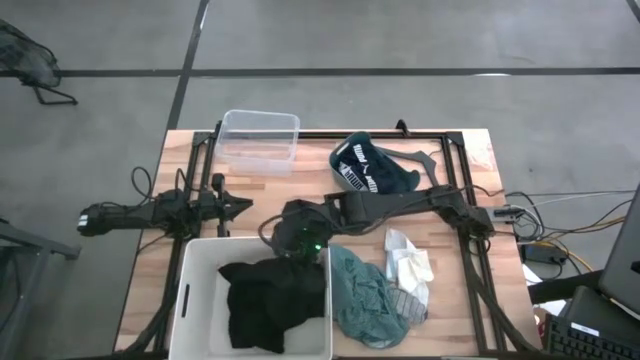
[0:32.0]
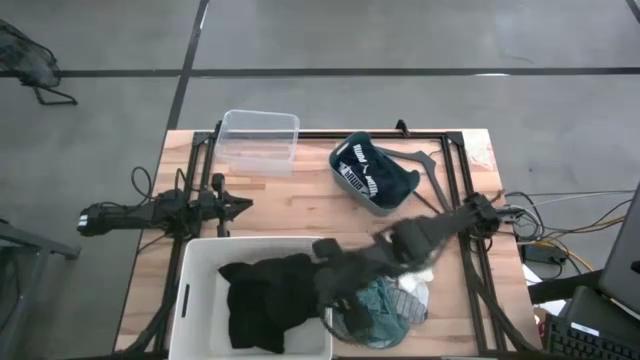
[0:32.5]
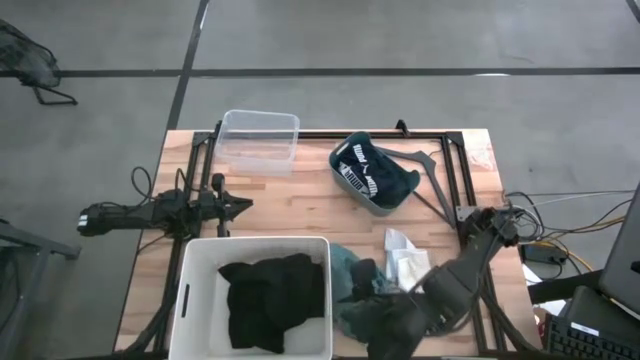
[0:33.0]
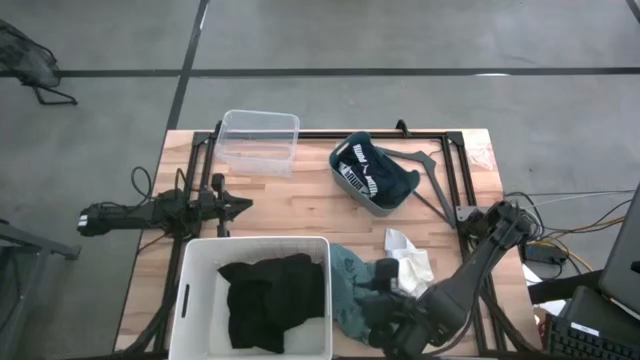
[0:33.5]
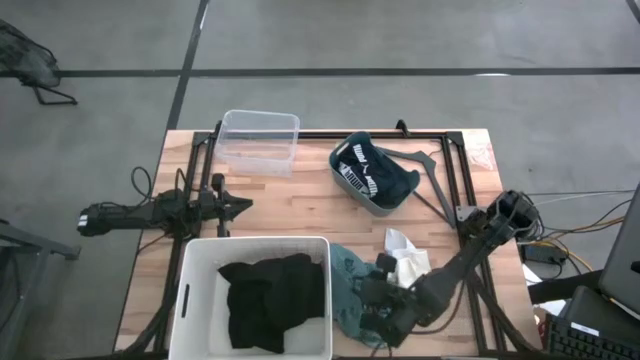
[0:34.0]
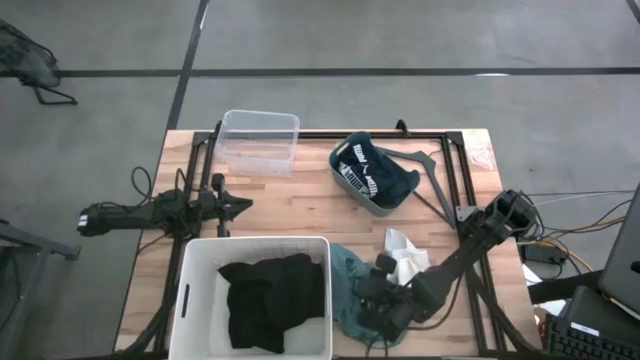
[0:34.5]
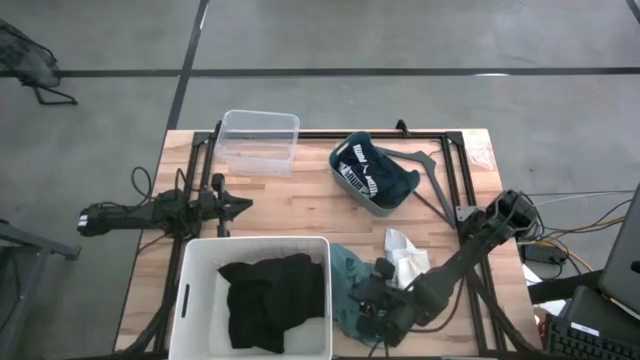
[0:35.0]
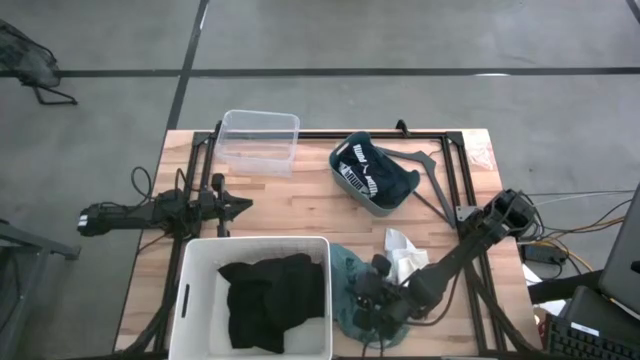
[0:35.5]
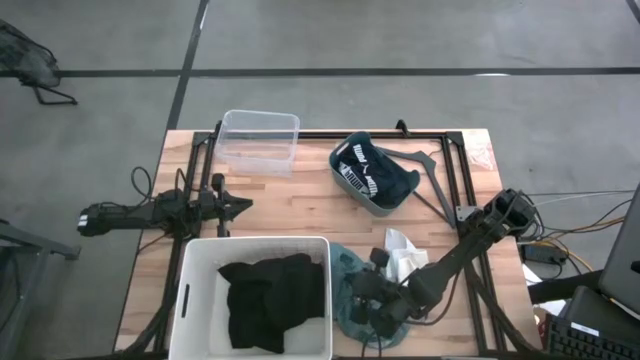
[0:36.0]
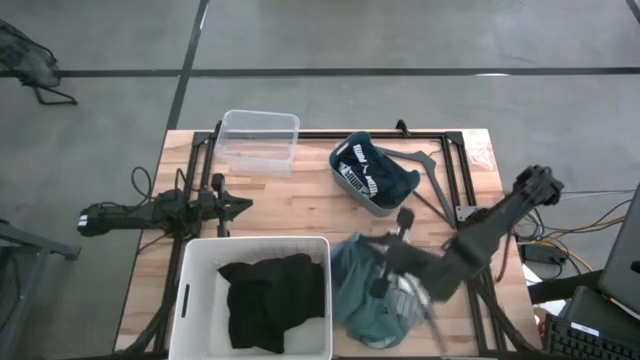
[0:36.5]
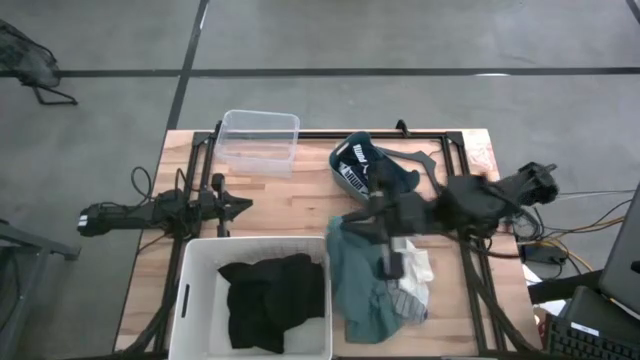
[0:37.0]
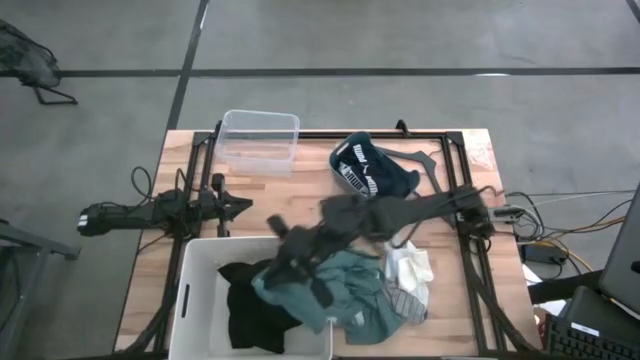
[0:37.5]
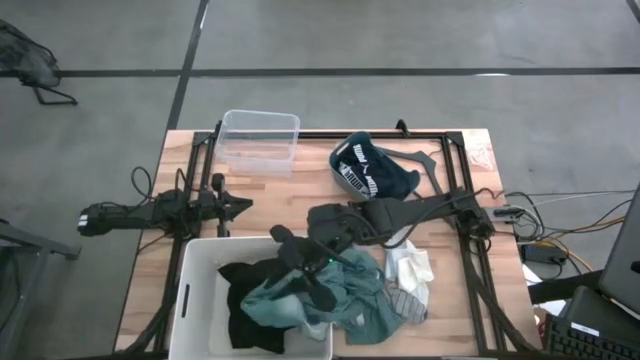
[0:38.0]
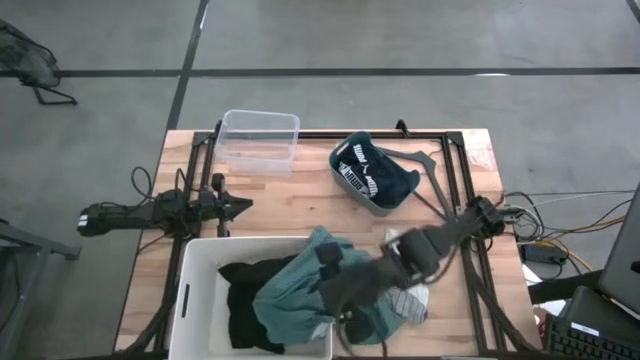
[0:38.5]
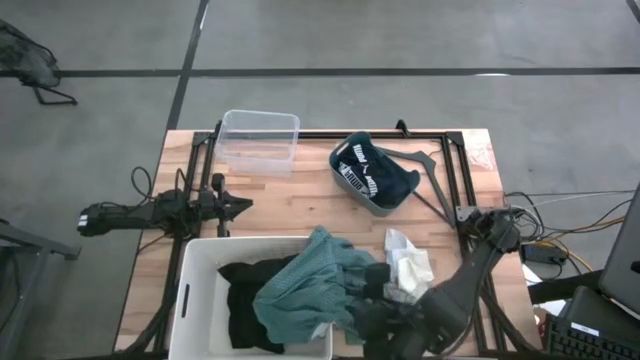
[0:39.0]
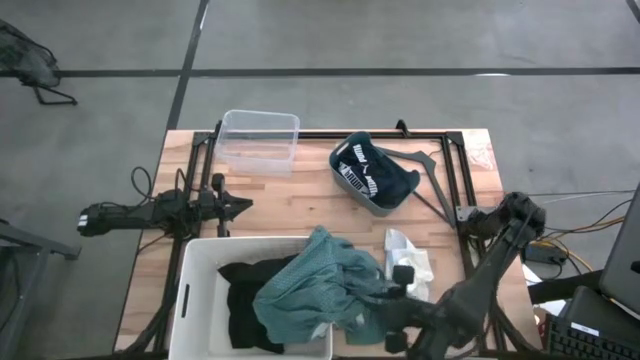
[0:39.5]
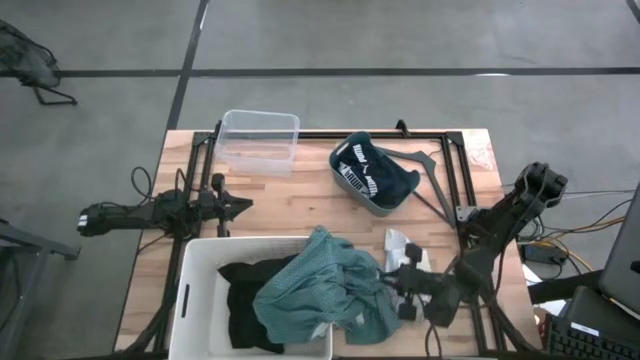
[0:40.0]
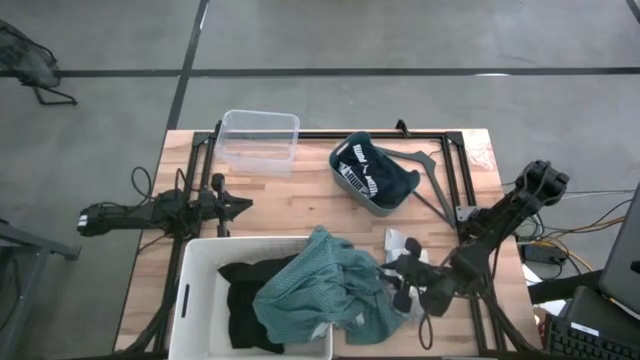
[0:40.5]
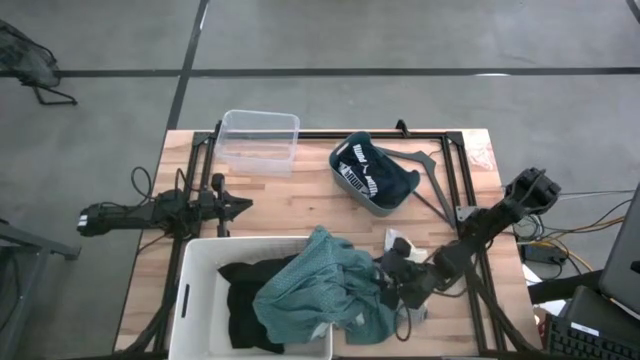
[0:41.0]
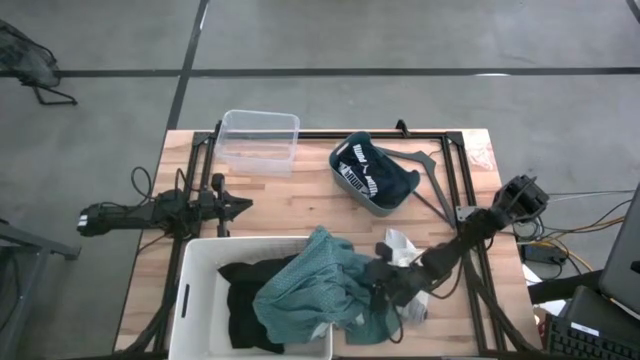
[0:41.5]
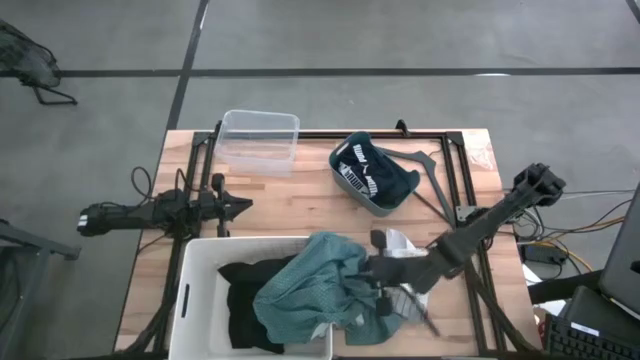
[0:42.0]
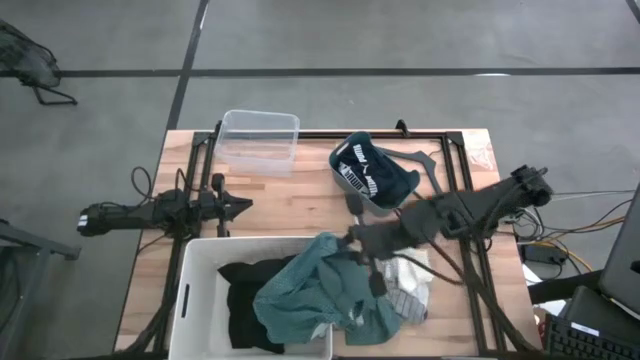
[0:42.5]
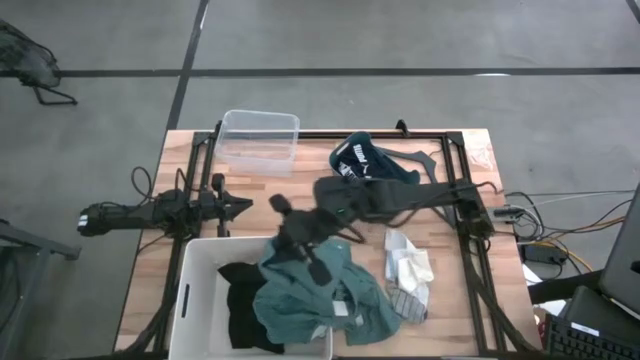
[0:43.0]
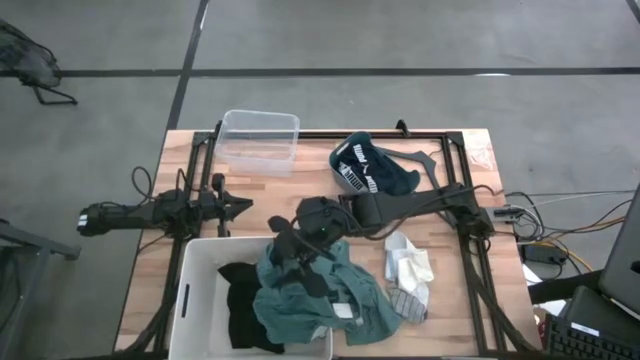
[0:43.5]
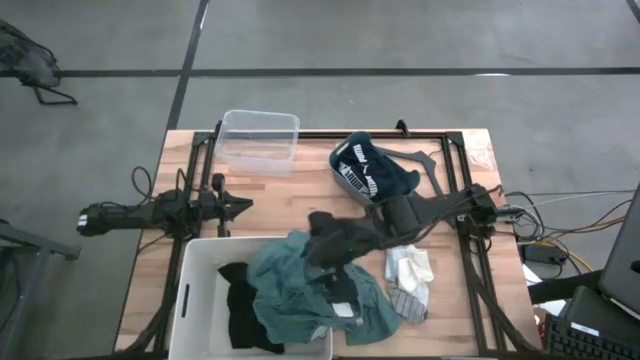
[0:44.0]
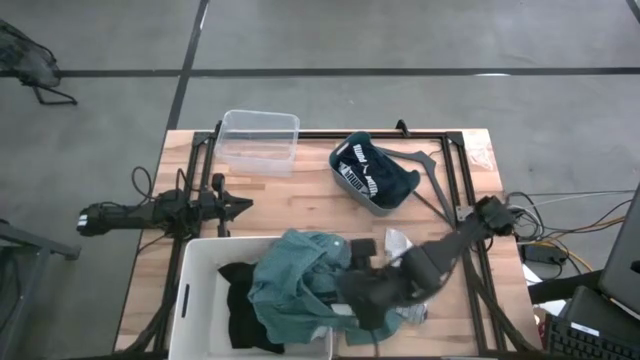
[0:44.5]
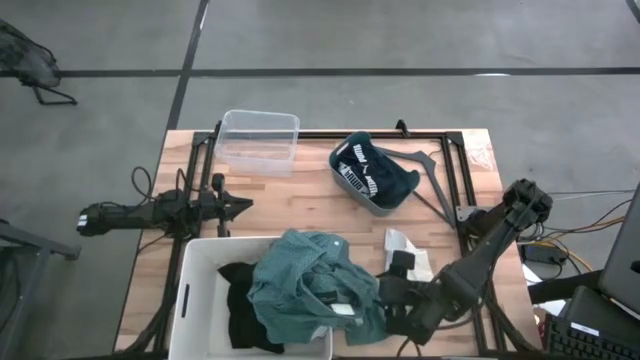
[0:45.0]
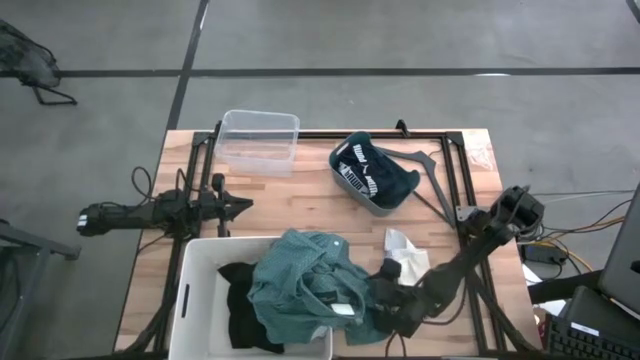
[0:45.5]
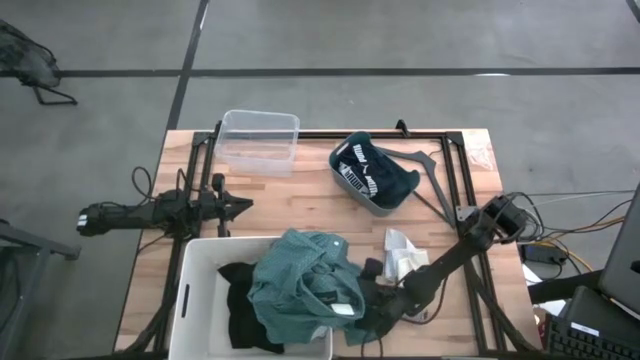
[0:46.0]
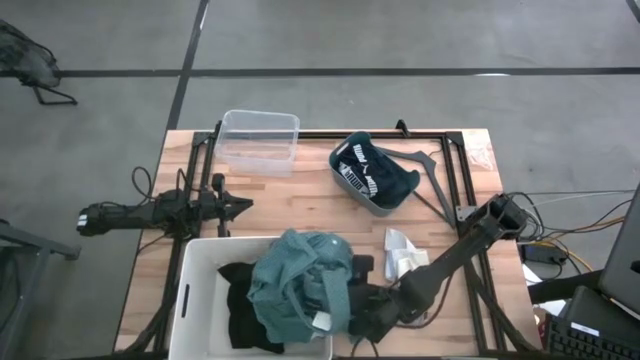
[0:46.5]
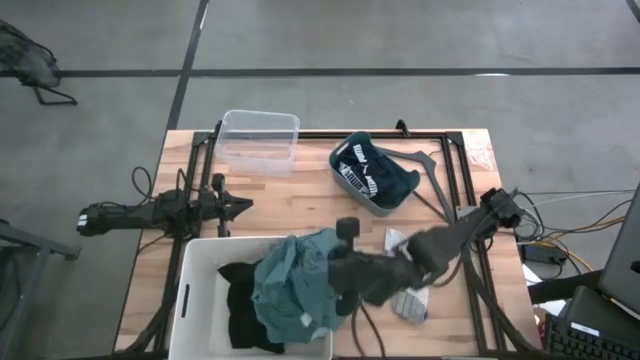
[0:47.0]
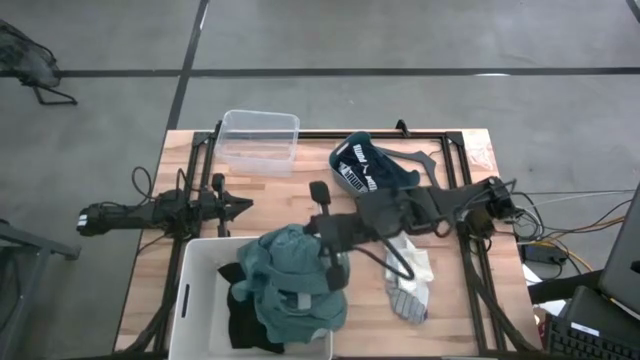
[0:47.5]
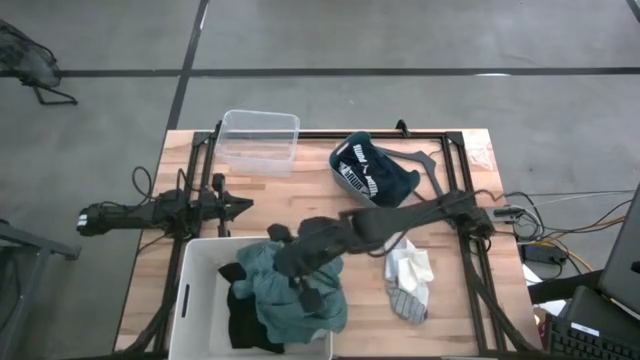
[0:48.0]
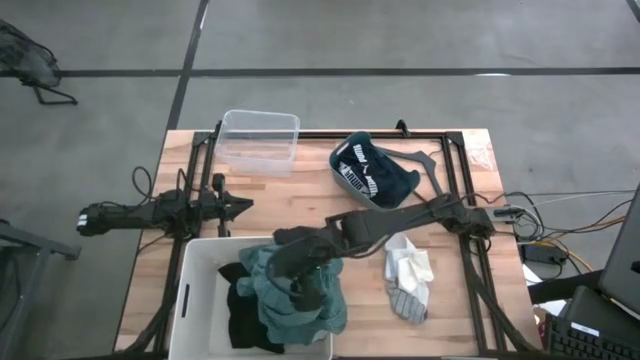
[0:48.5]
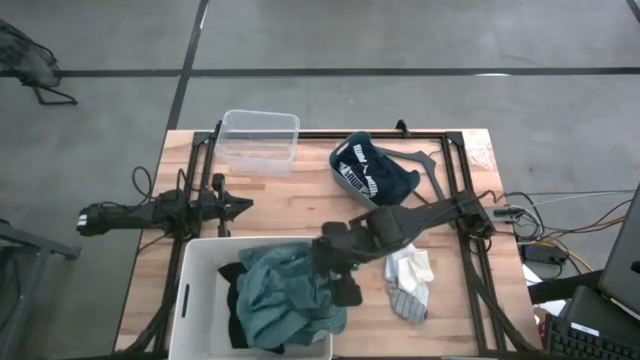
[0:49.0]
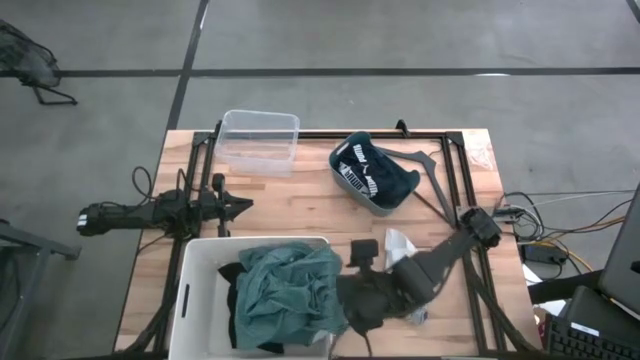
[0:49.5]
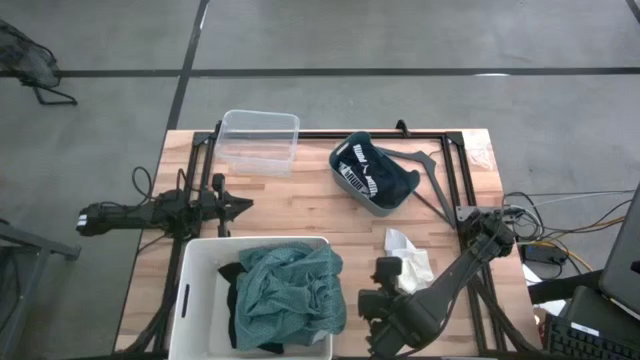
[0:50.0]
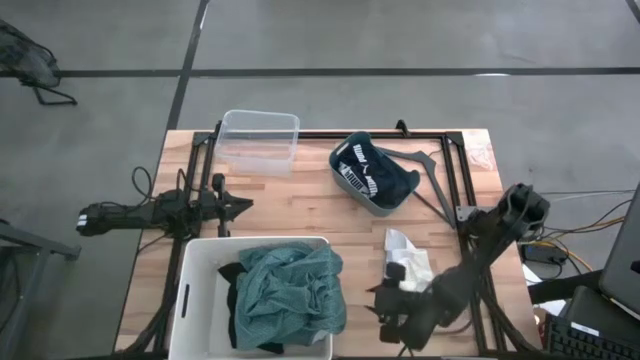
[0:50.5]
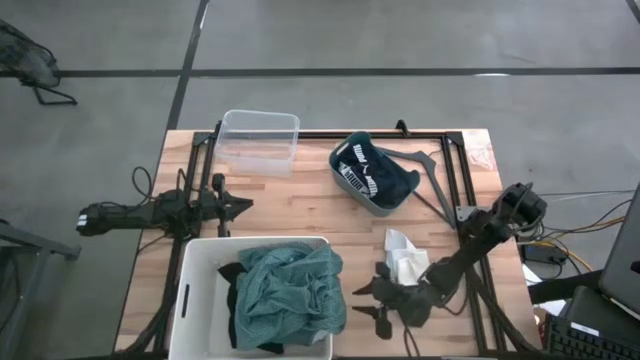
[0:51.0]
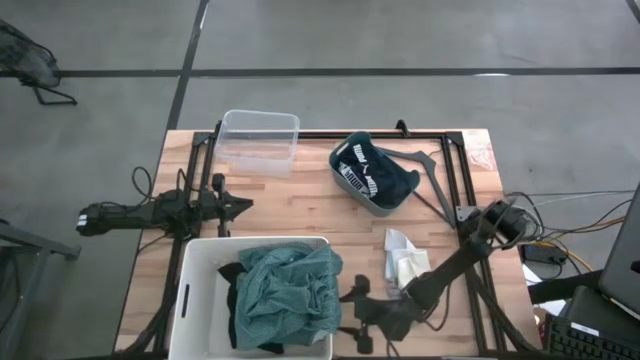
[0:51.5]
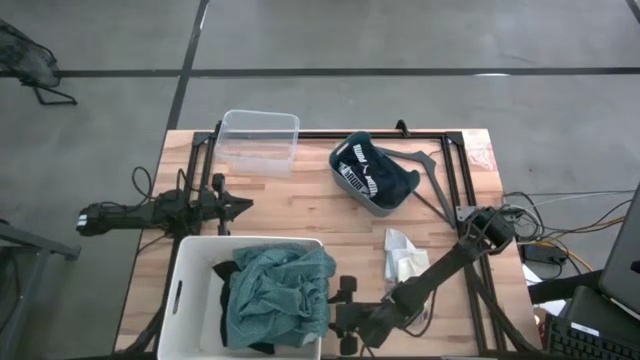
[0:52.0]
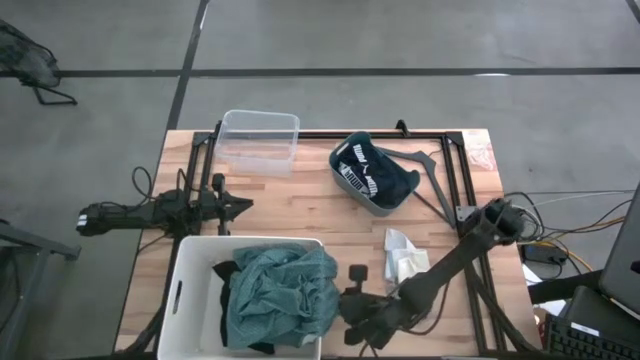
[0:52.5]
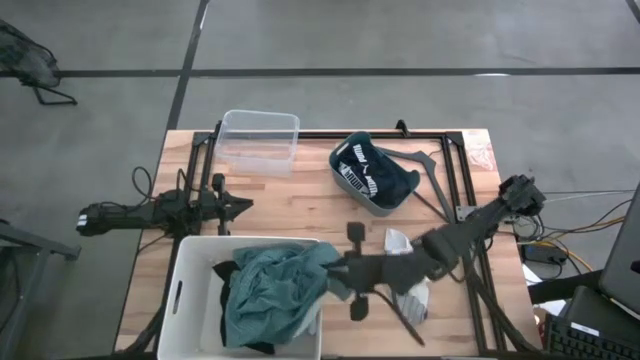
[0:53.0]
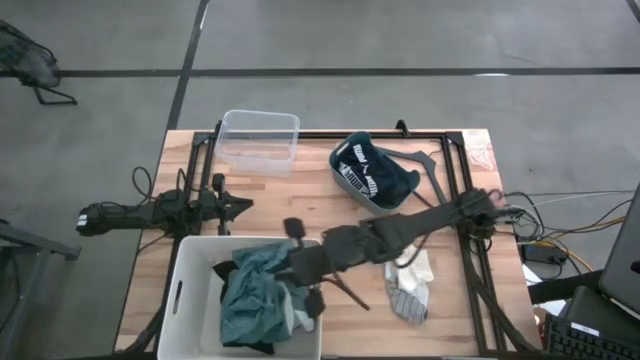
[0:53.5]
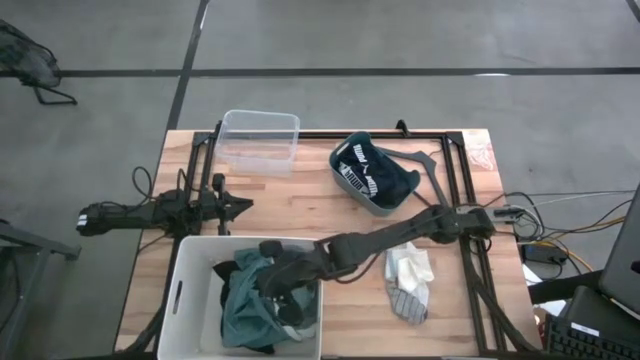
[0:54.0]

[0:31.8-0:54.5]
Task: Pick & Place Cloths
Put the green shirt into the white bin
